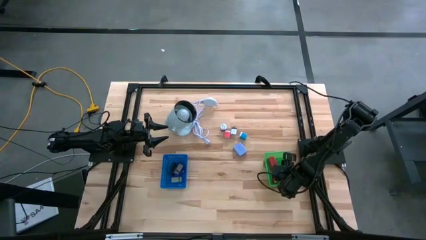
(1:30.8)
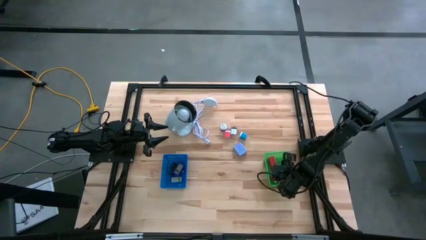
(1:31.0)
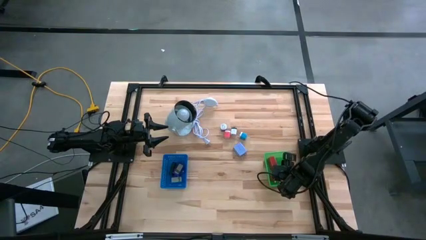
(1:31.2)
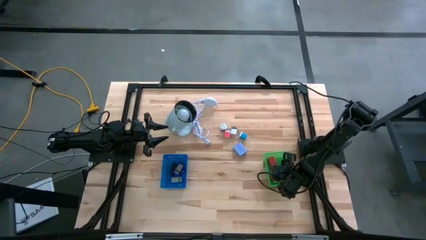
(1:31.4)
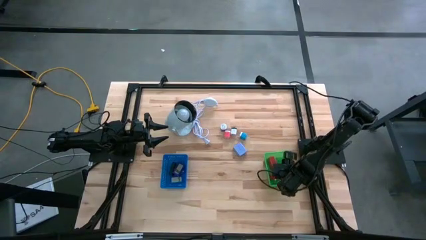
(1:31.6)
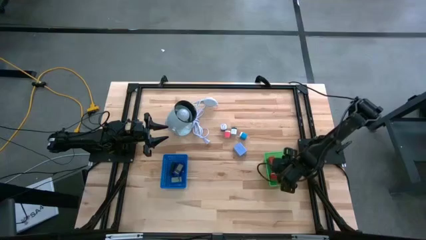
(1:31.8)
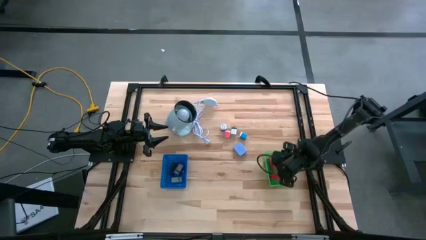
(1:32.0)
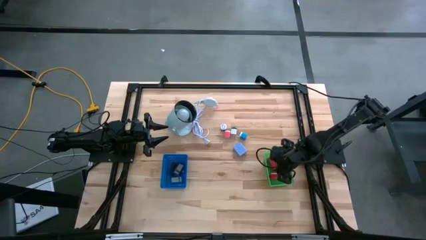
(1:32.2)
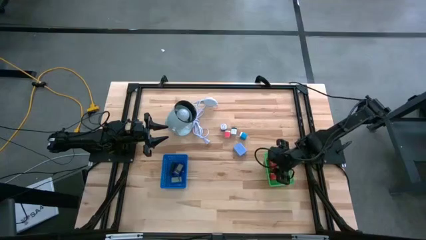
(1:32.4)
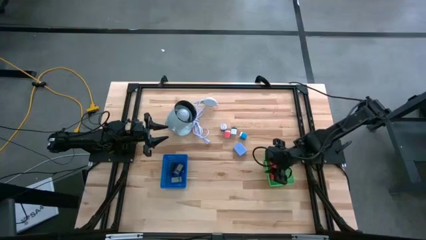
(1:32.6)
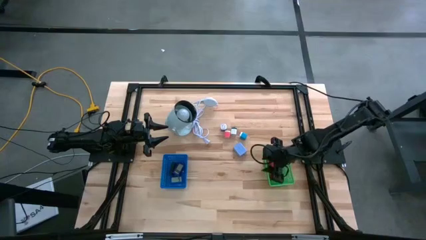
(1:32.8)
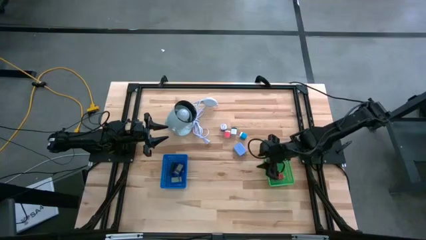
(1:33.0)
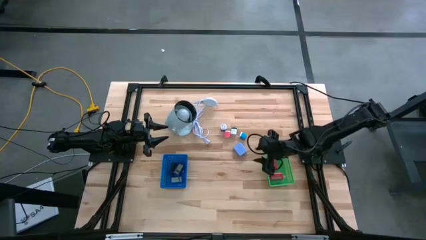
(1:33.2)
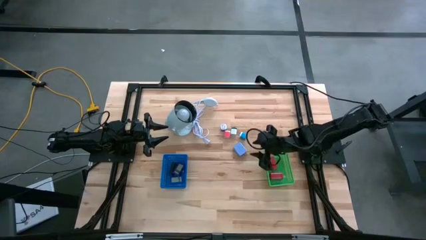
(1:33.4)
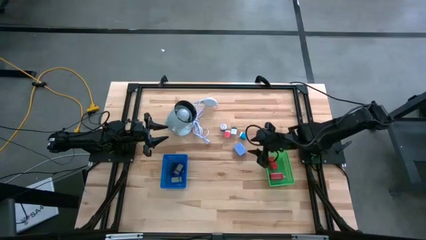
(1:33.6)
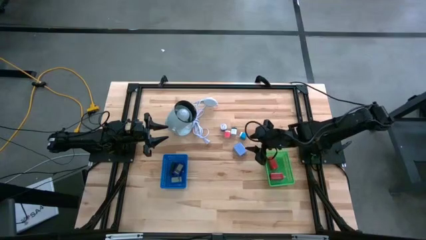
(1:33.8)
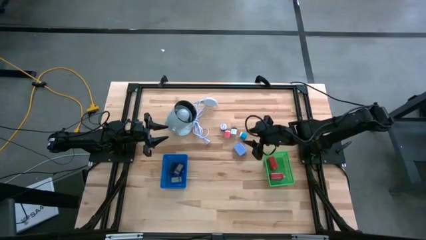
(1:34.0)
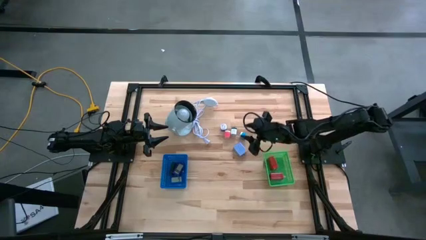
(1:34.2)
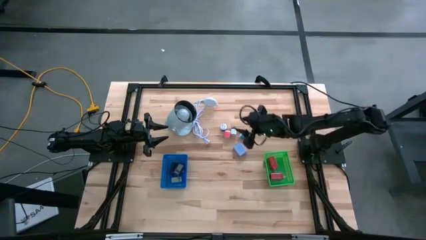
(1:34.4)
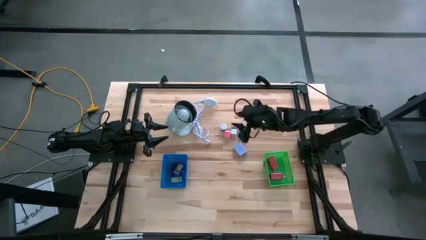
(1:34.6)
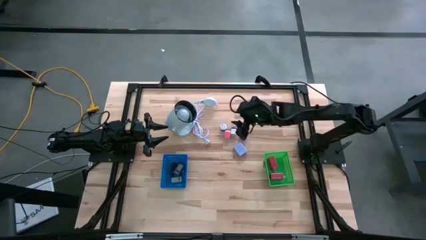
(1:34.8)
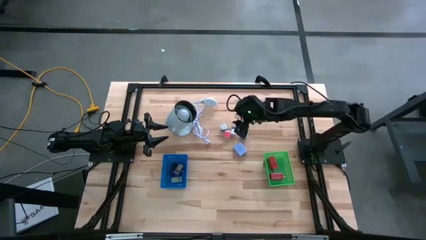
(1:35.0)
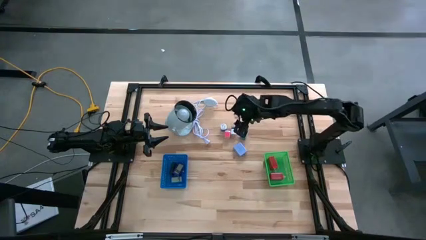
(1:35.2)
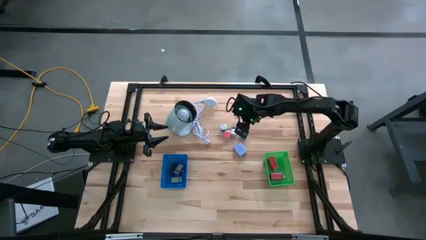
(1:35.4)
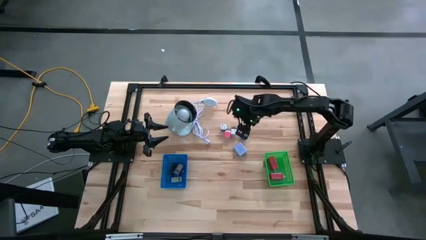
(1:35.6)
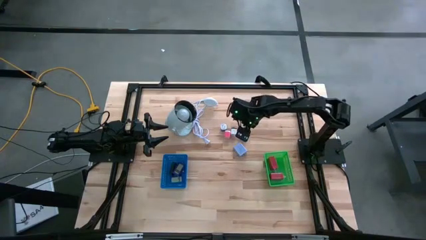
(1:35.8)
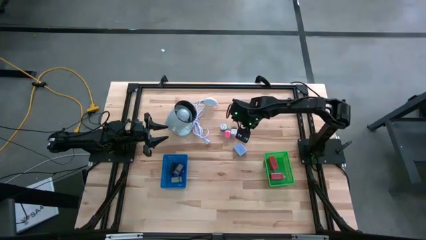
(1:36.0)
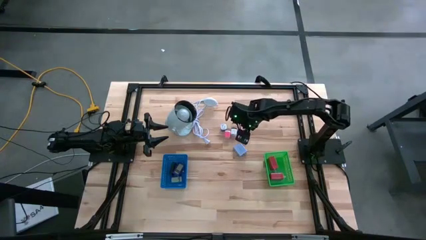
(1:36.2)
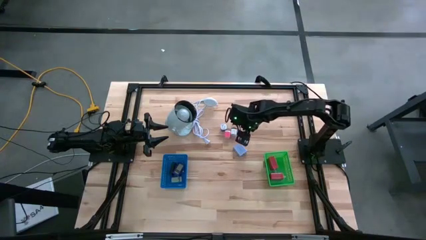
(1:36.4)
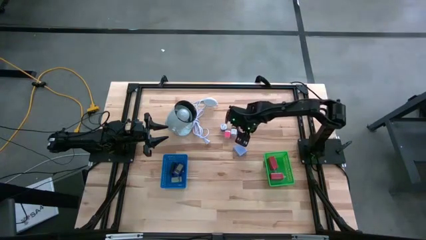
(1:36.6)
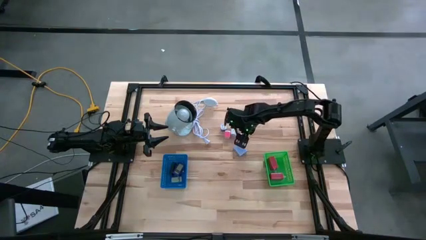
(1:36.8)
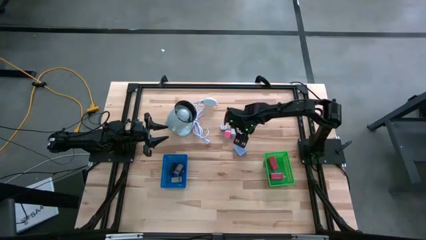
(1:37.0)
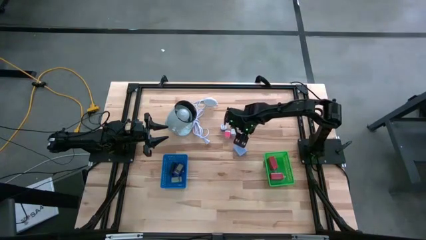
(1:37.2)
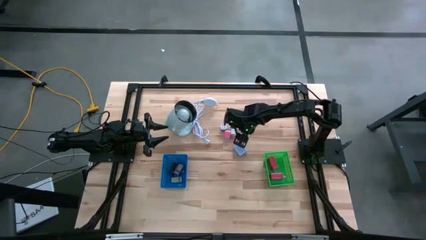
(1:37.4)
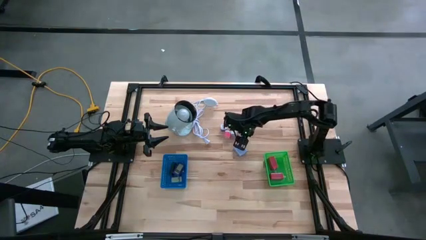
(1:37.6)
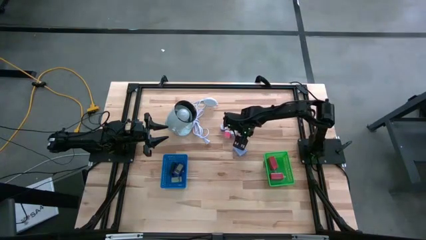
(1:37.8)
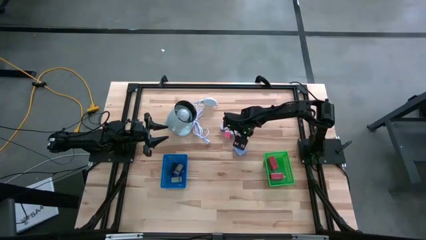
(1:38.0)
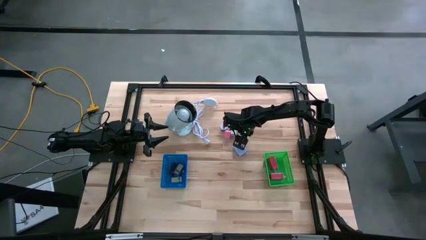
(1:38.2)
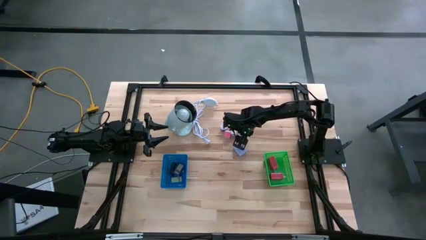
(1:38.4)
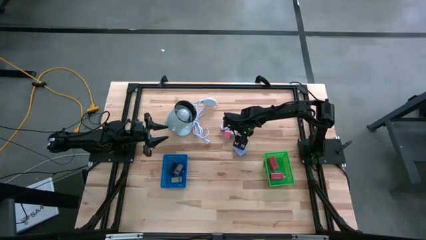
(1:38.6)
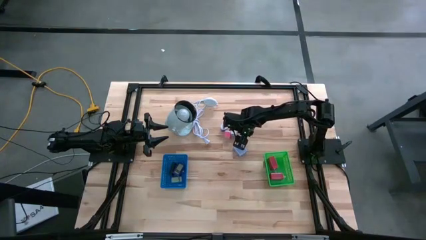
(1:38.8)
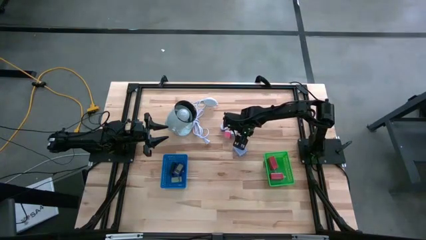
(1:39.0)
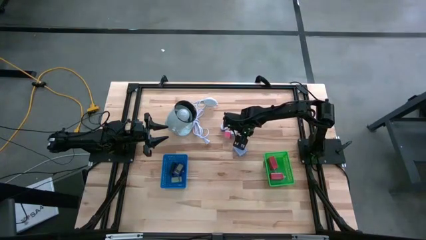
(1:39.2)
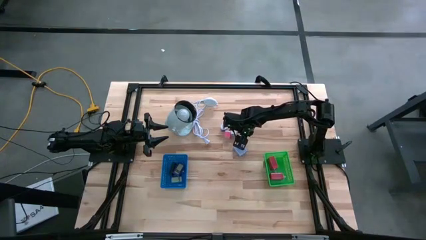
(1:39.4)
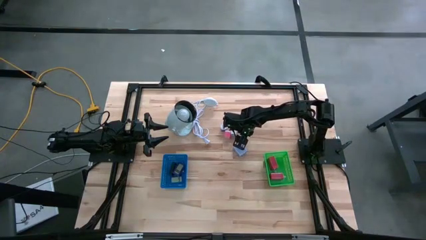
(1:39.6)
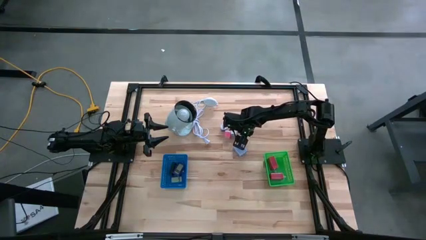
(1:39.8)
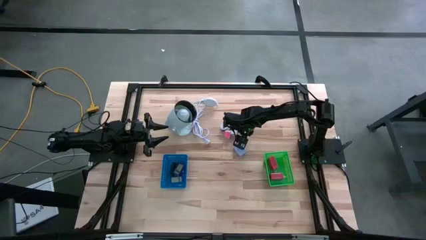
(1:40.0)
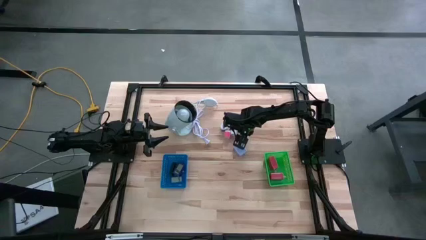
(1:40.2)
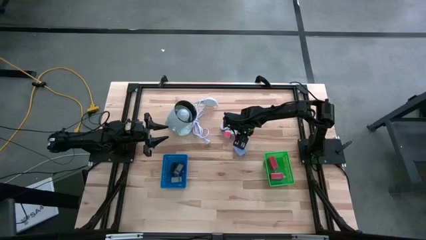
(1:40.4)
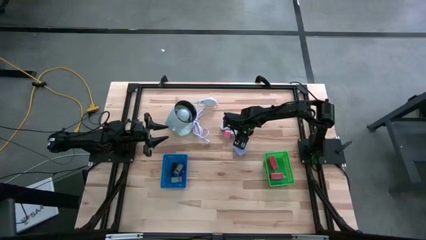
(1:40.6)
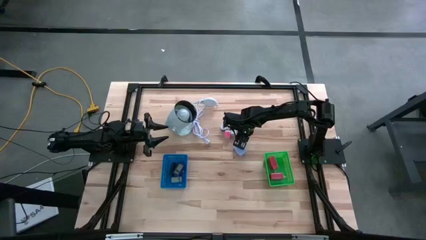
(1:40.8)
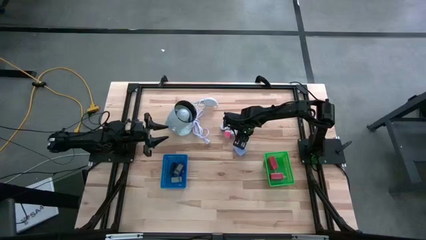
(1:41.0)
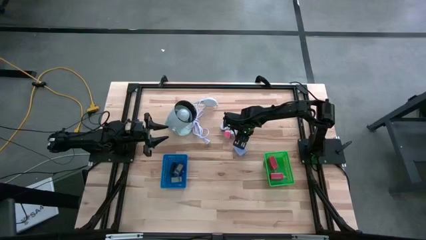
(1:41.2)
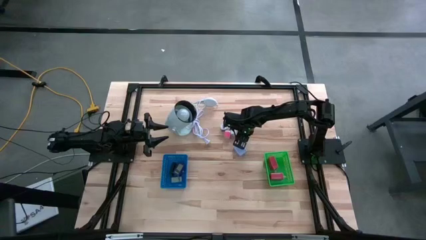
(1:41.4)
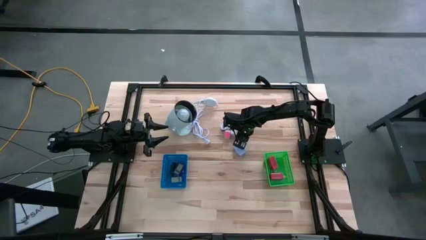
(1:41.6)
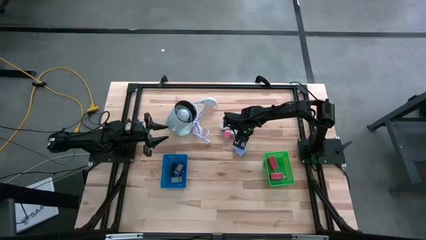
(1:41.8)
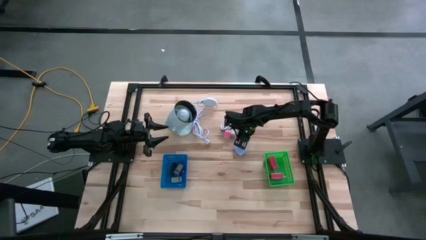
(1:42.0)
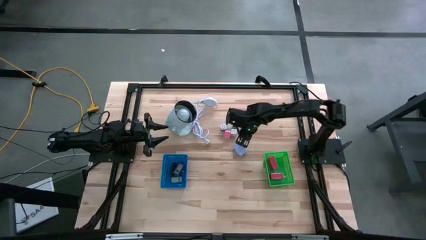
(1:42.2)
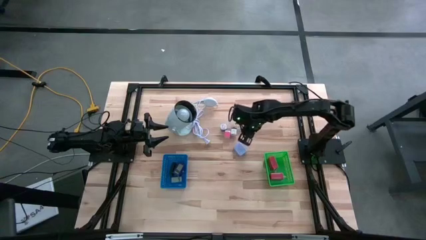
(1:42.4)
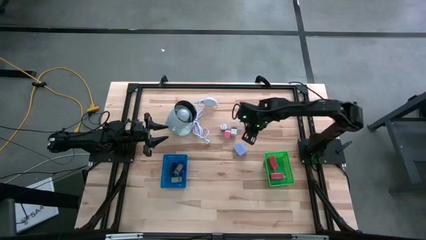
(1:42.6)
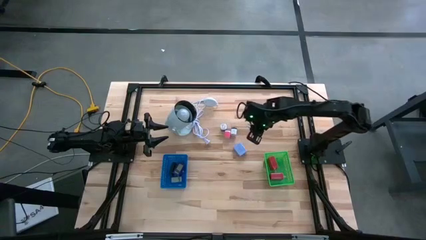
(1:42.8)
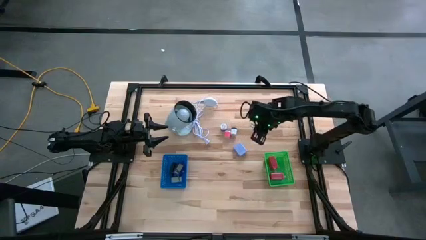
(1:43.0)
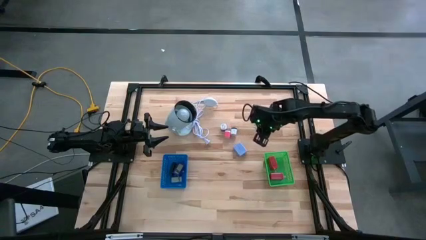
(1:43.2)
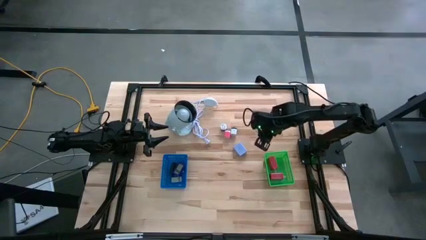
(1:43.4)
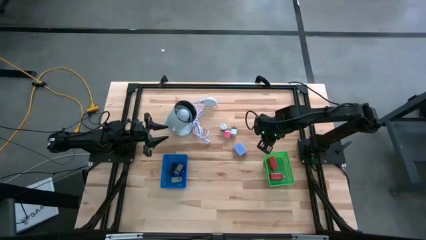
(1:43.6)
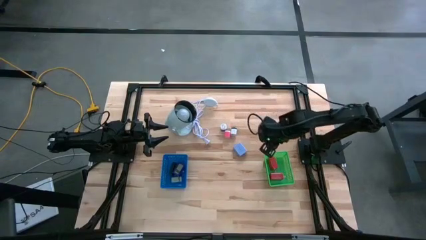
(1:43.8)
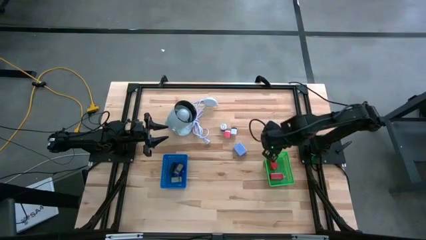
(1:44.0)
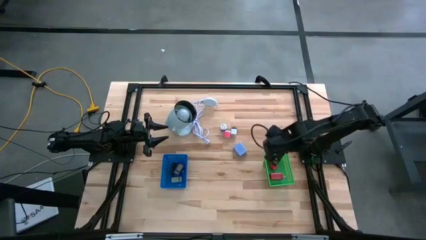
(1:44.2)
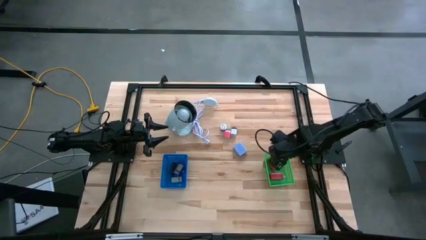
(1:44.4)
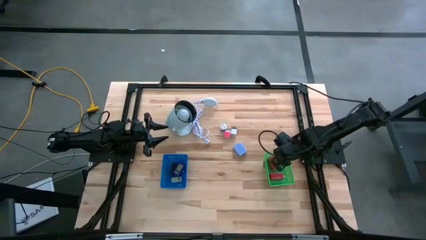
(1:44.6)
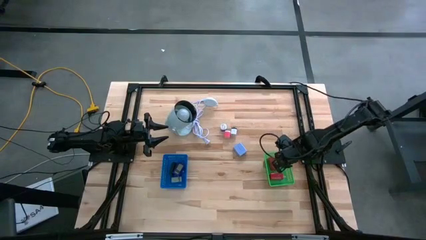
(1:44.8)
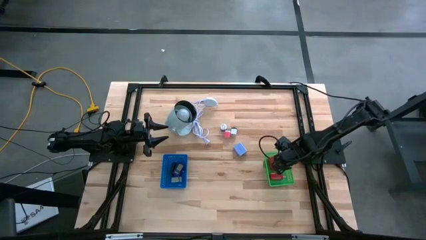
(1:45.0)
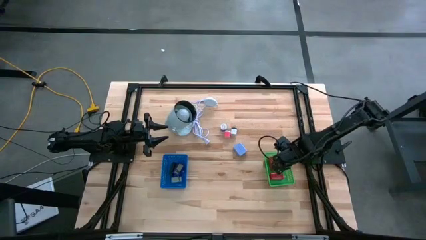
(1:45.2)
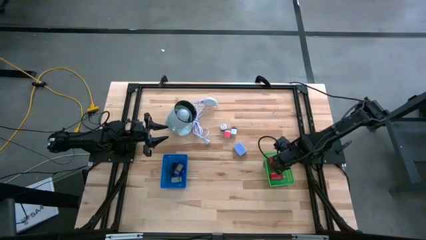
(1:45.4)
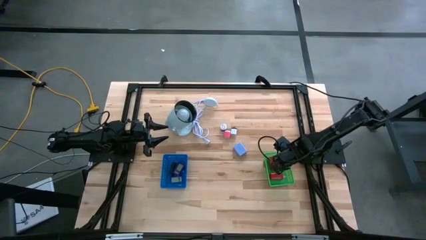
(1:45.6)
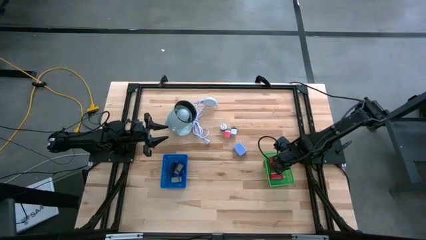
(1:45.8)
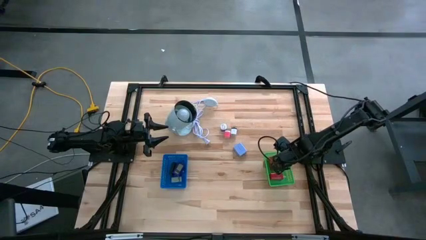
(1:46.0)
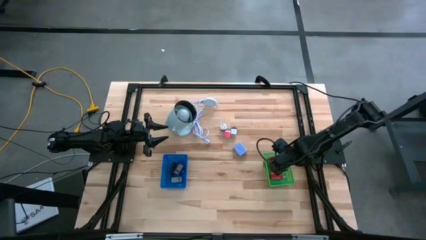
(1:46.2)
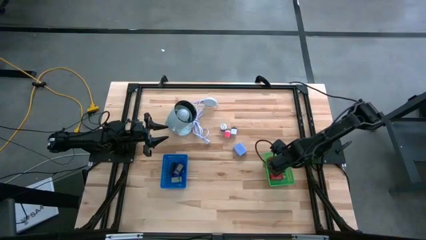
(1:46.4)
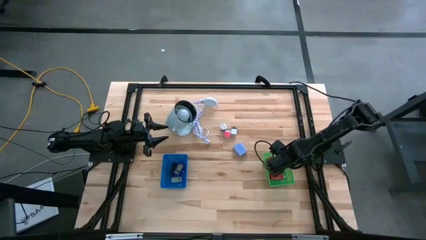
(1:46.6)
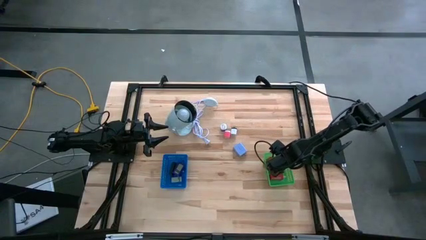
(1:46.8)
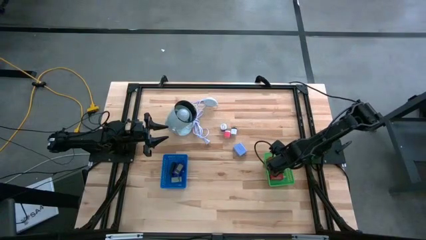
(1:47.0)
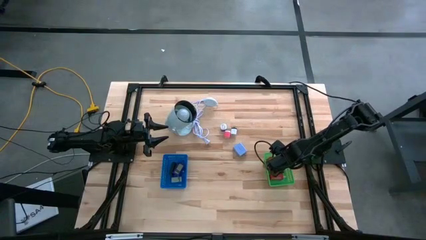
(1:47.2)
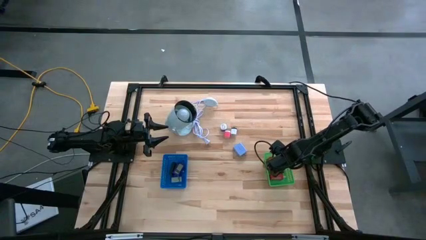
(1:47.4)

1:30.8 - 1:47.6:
Task: Pick & Place Office items
Put the blue charger adapter into the green bin
